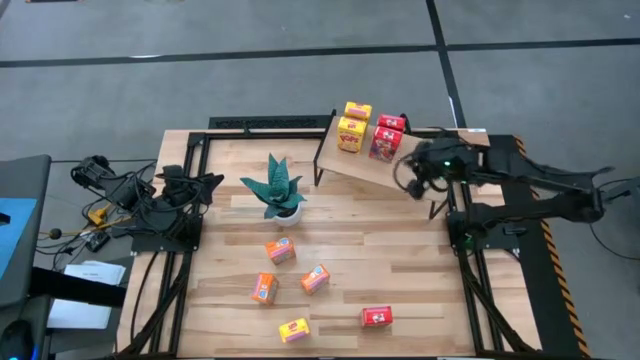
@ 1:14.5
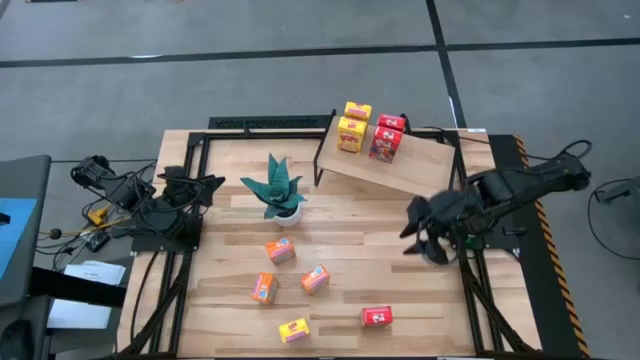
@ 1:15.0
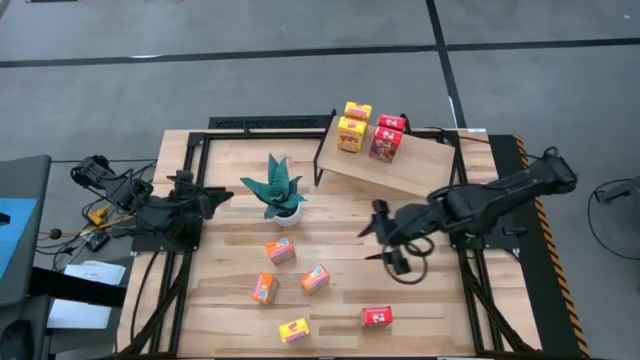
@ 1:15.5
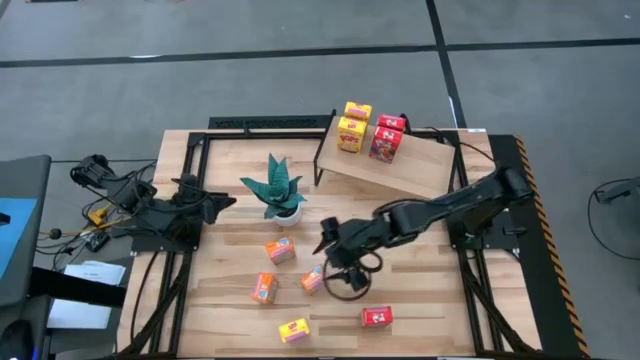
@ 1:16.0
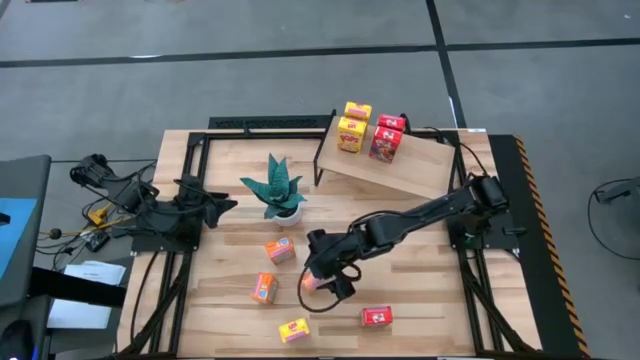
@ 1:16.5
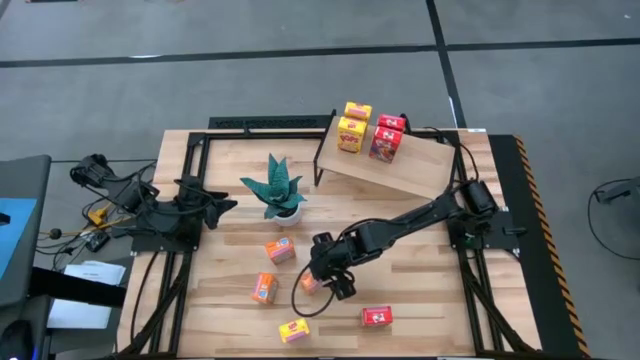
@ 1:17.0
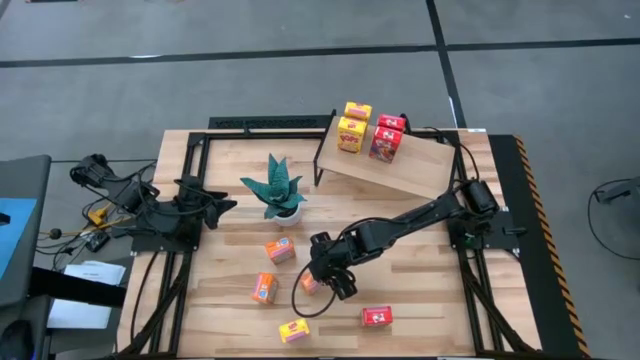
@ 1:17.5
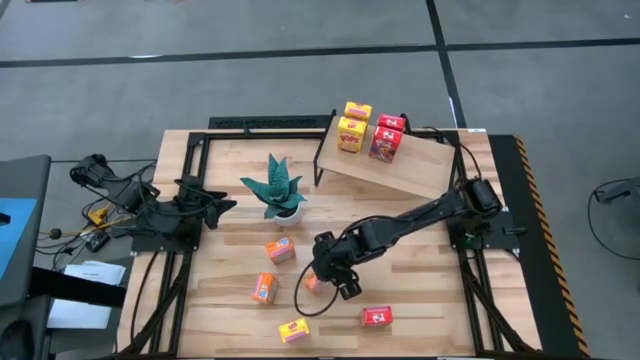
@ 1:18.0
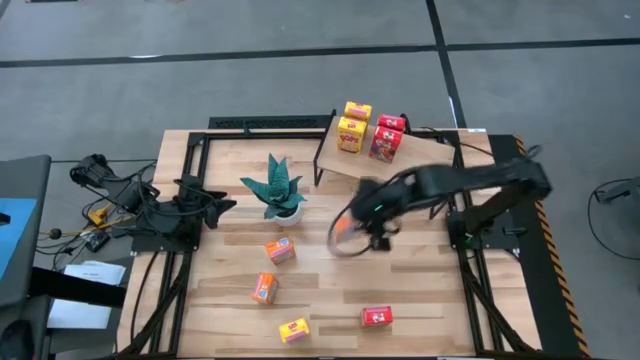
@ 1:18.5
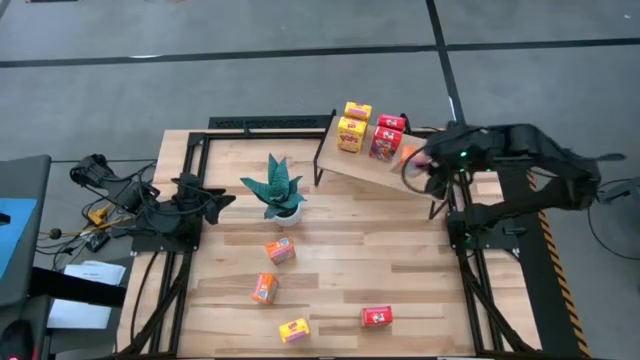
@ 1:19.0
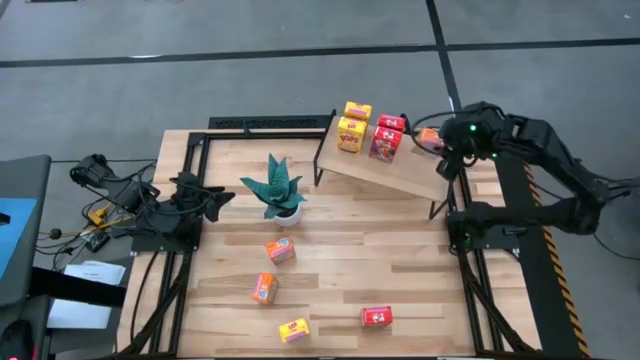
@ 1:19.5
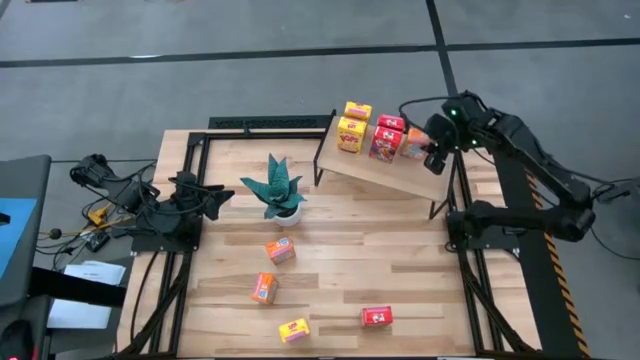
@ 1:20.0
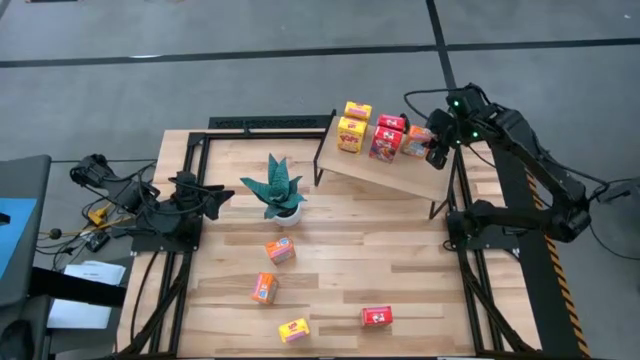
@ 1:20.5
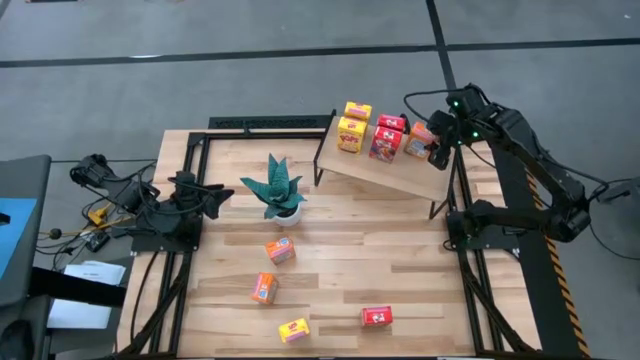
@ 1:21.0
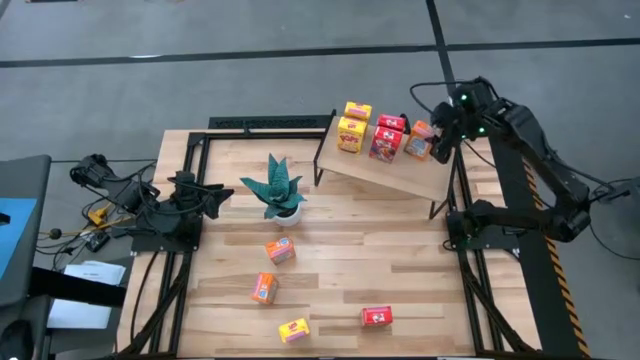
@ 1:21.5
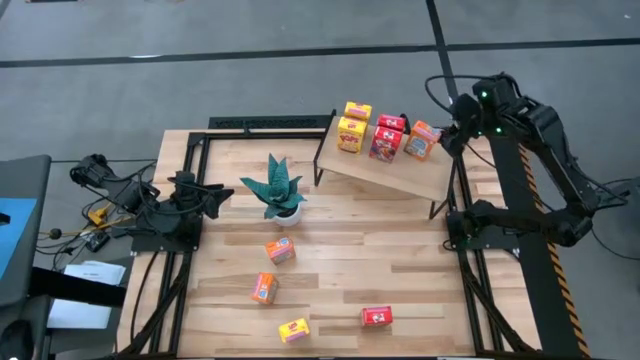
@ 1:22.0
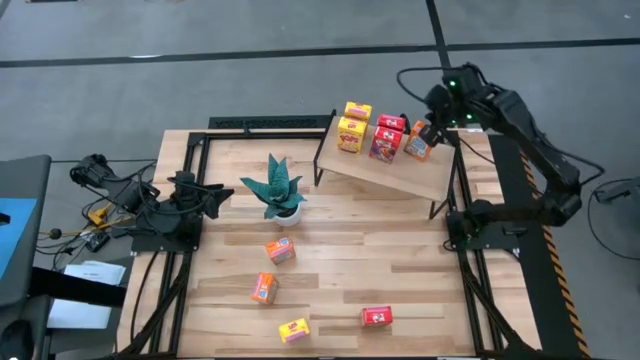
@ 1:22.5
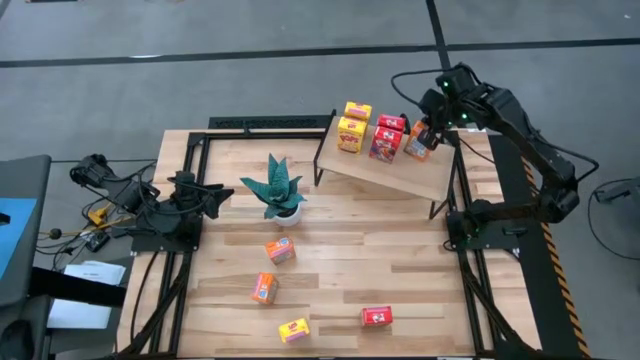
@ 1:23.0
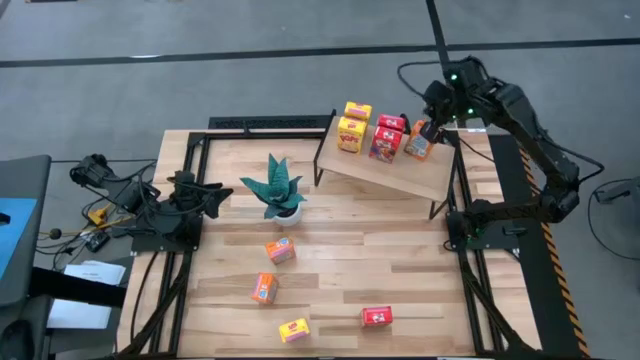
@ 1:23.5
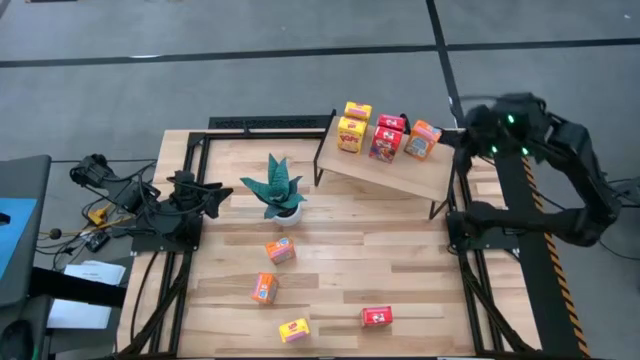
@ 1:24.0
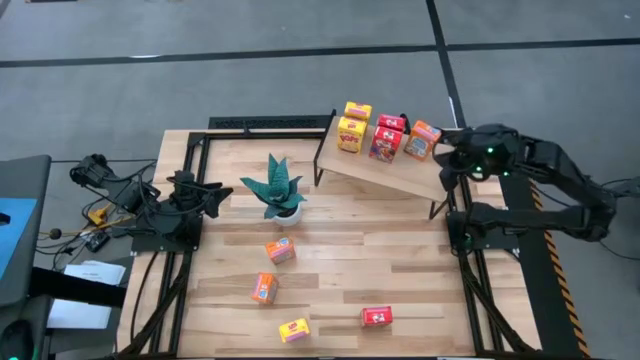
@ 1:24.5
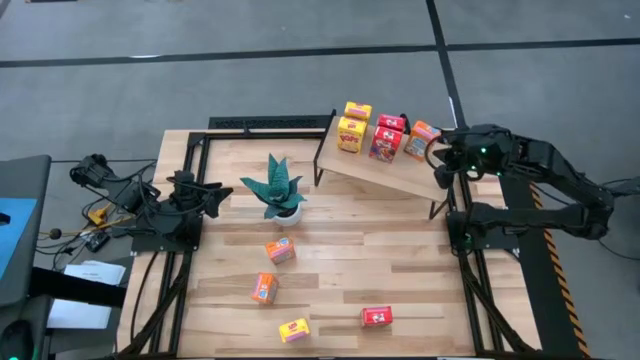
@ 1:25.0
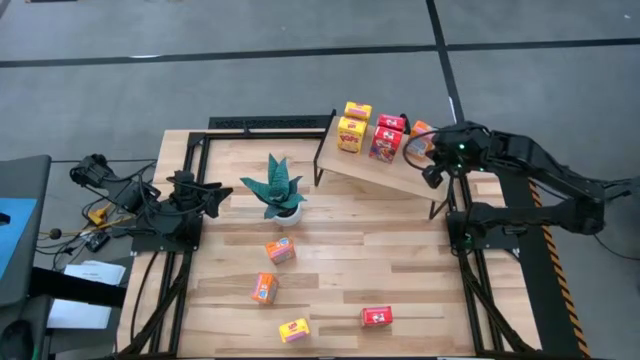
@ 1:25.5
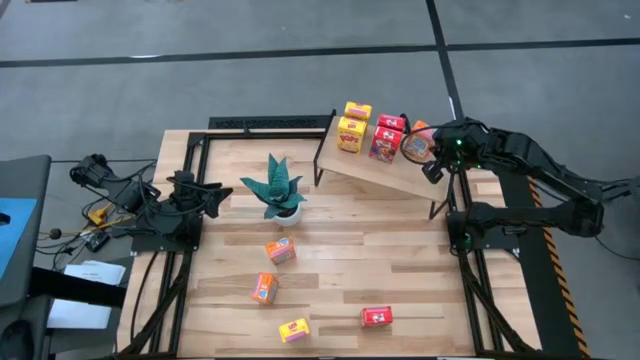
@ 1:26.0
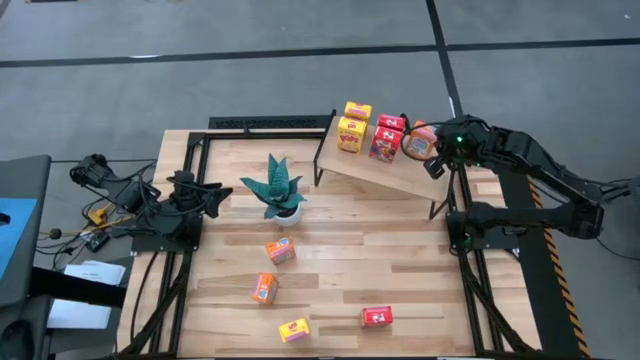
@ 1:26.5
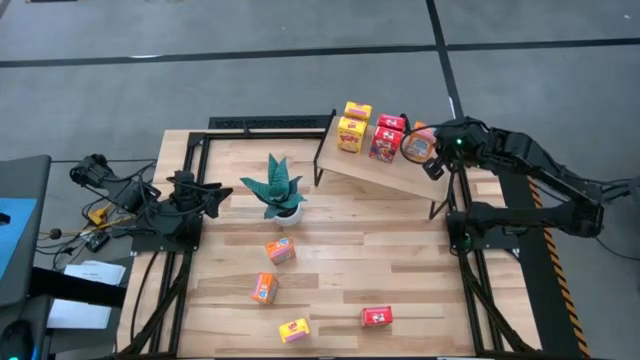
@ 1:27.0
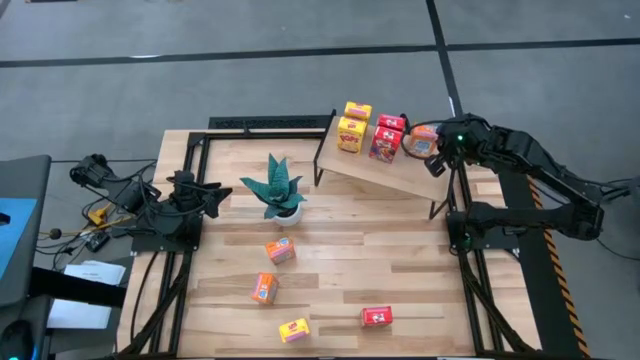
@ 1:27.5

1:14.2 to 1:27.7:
Task: Stack cereal on shelf
Put the right orange cereal box on the shelf

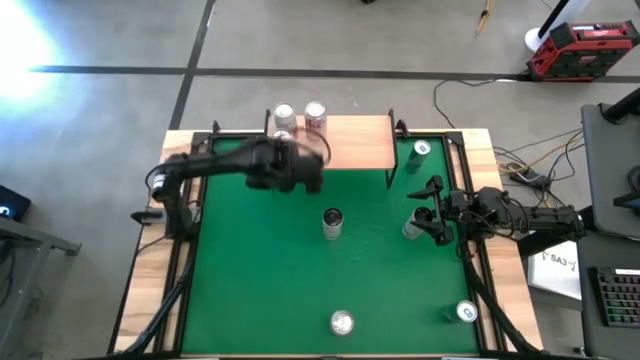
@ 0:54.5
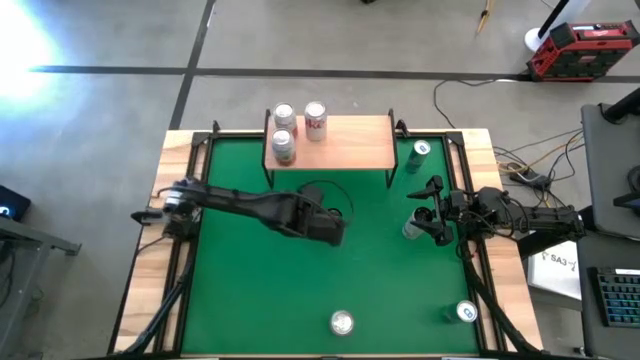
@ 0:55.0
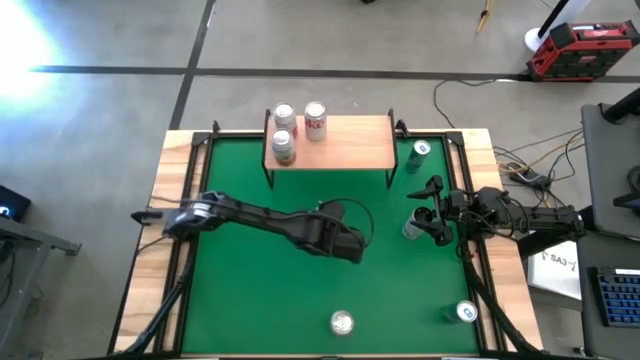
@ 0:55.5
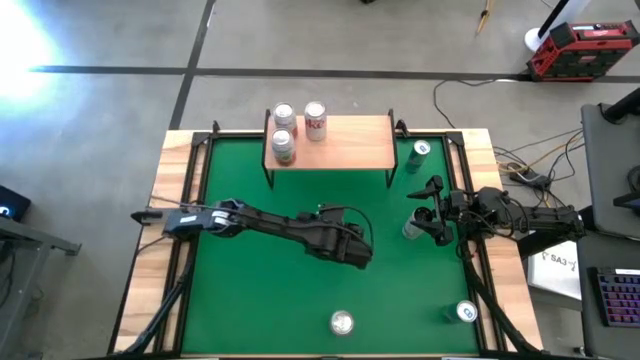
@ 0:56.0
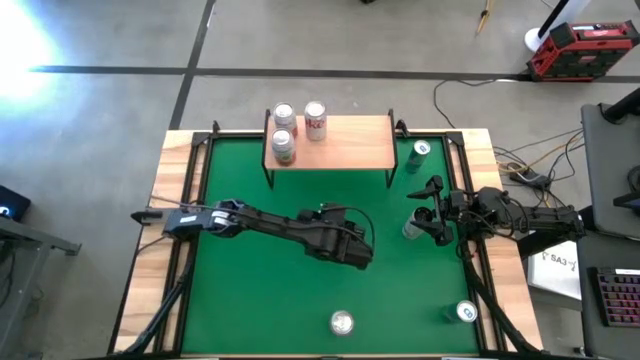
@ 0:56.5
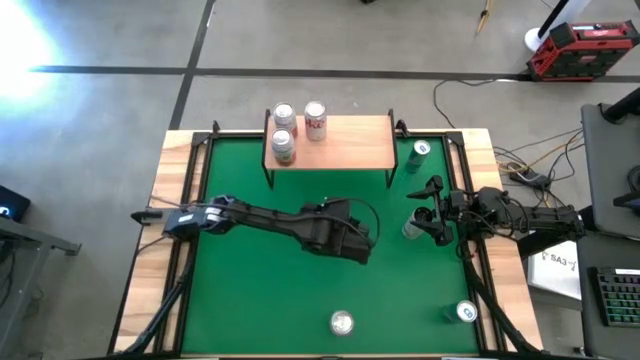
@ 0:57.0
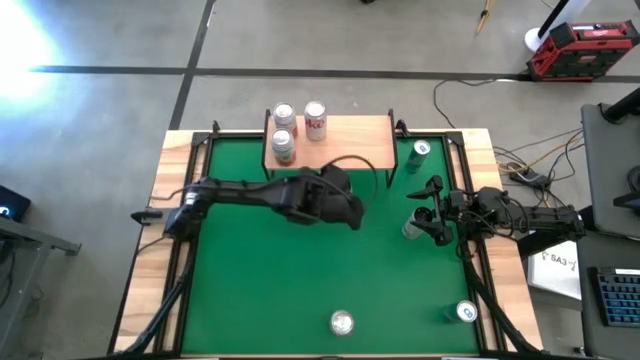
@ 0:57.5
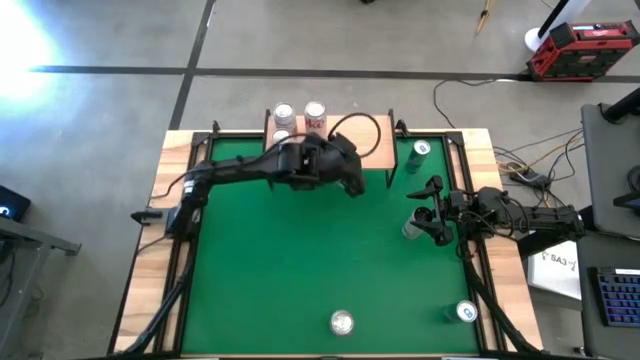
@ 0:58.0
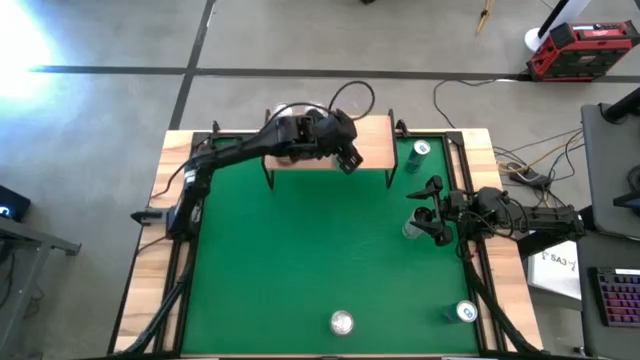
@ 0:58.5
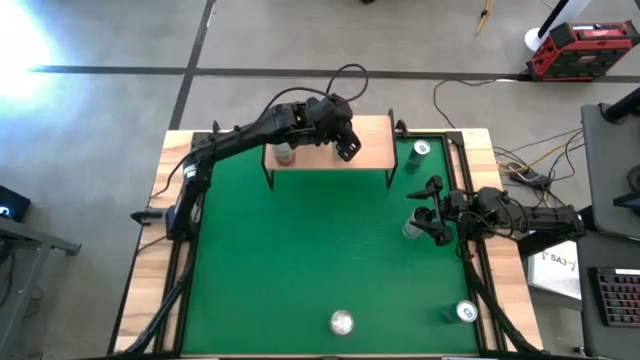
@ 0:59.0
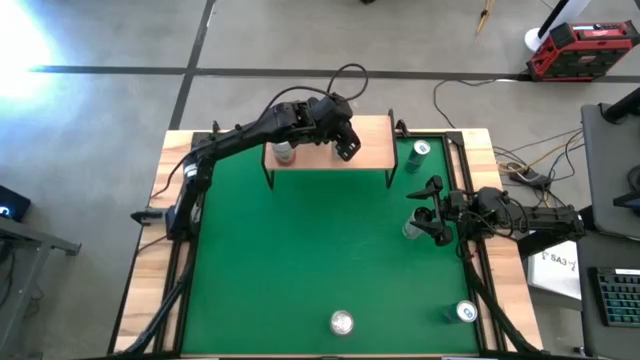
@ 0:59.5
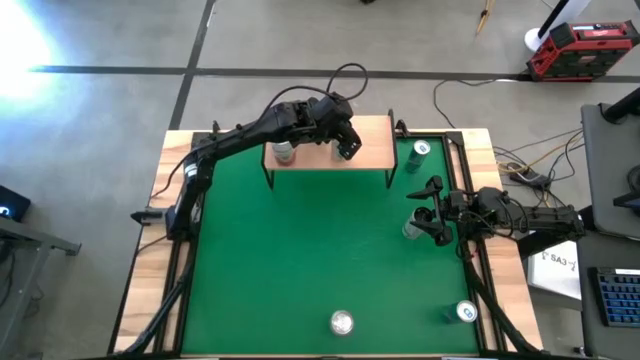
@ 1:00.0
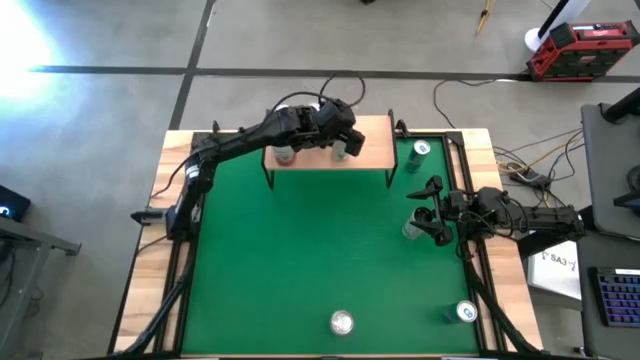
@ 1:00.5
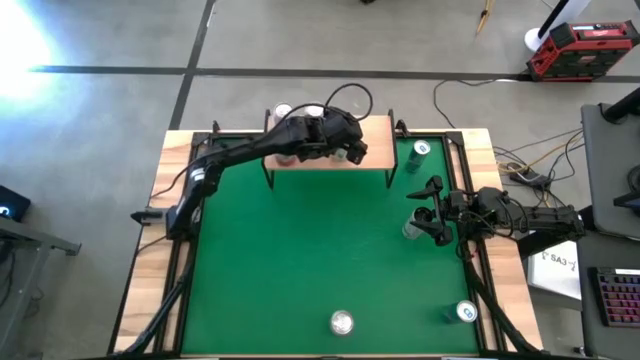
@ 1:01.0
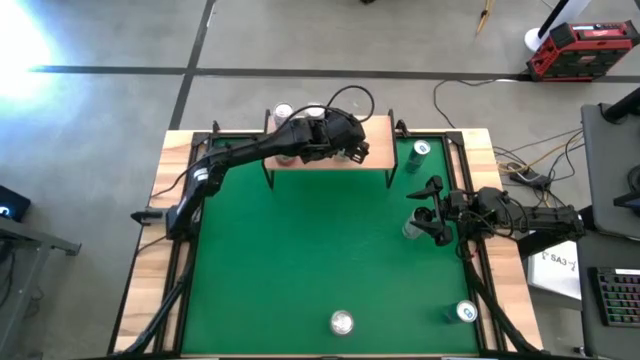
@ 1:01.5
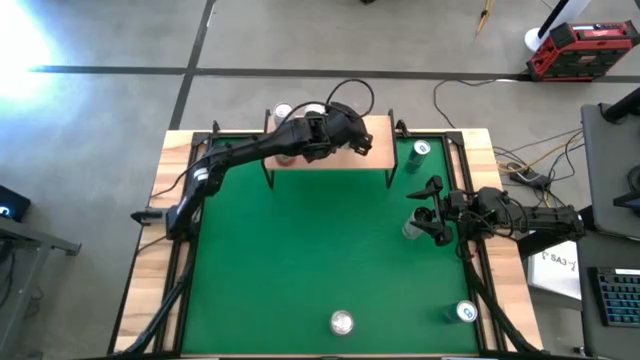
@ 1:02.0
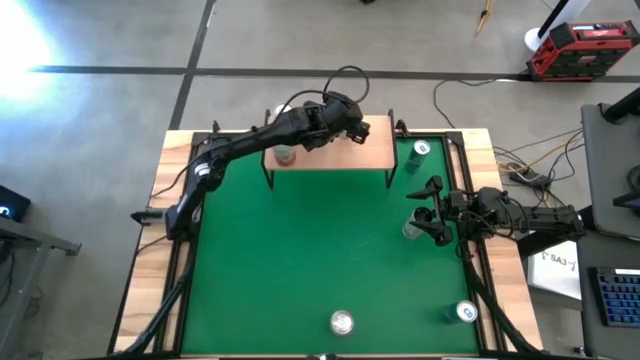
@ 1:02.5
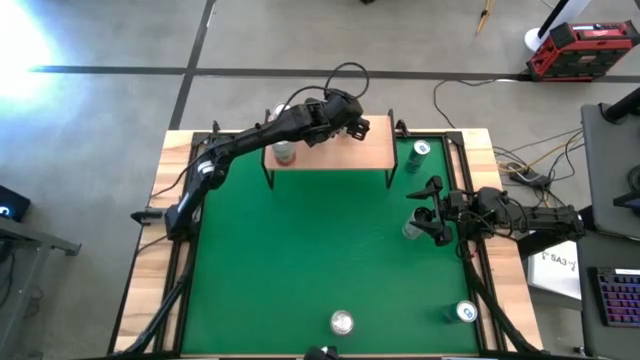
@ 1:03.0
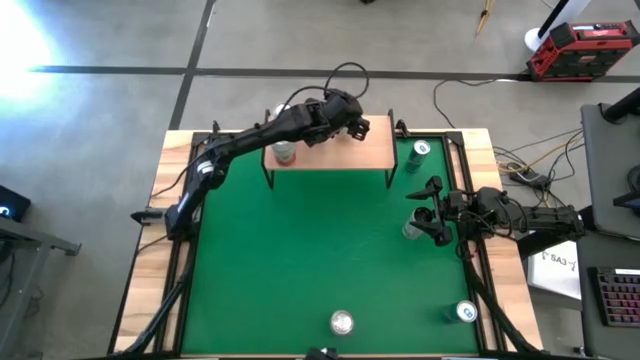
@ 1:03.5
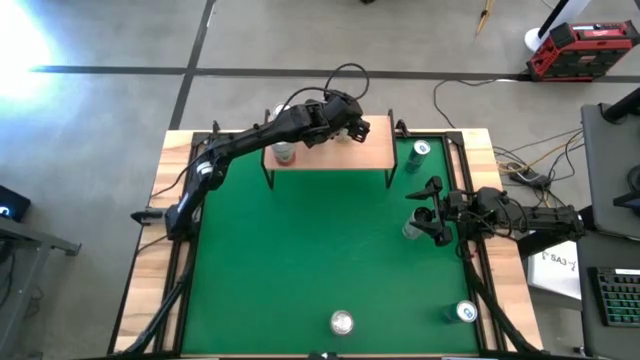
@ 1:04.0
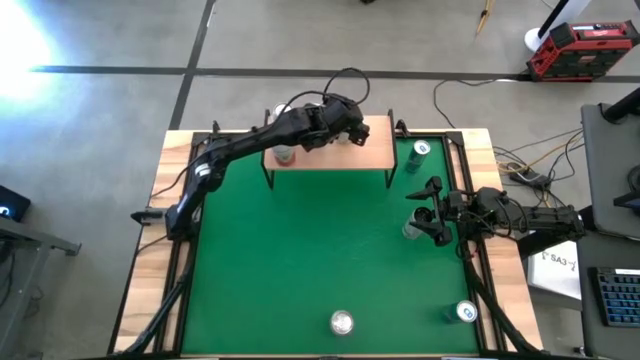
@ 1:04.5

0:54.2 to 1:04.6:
Task: Place canned beverage on shelf
Put the left white-yellow soda can on the shelf
